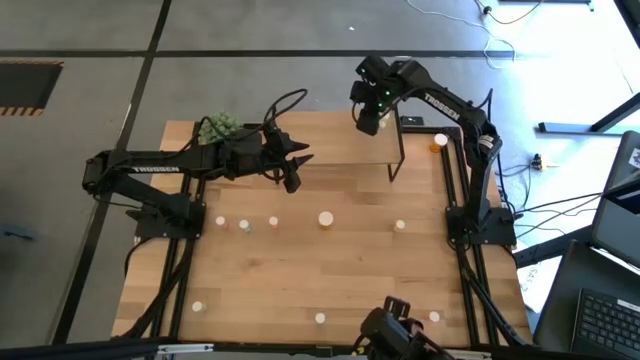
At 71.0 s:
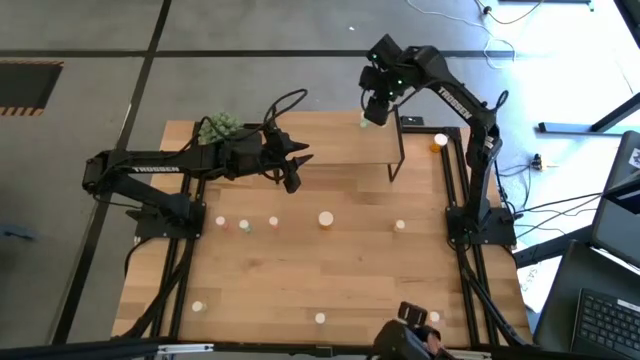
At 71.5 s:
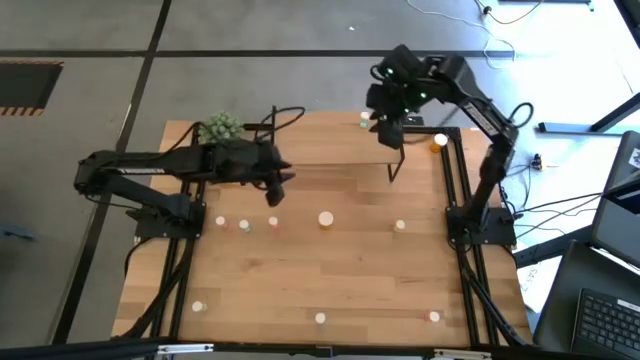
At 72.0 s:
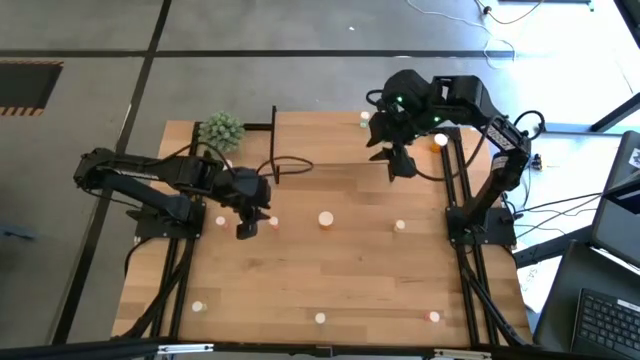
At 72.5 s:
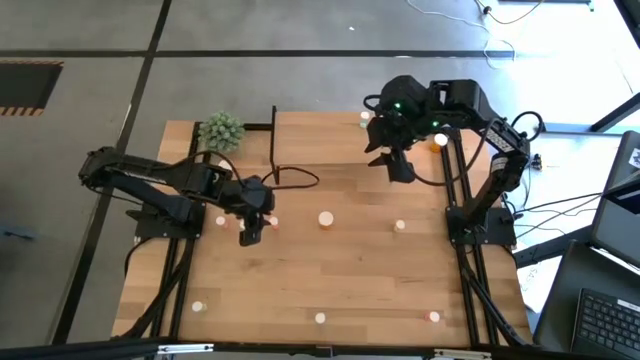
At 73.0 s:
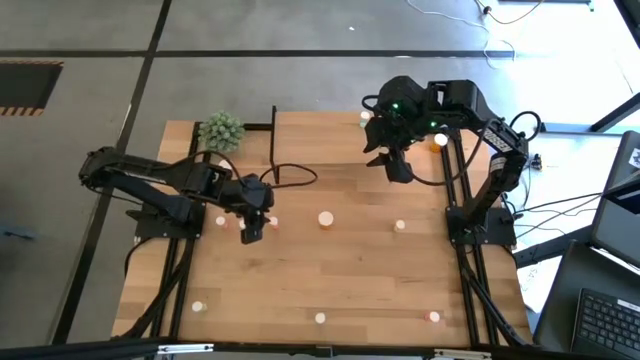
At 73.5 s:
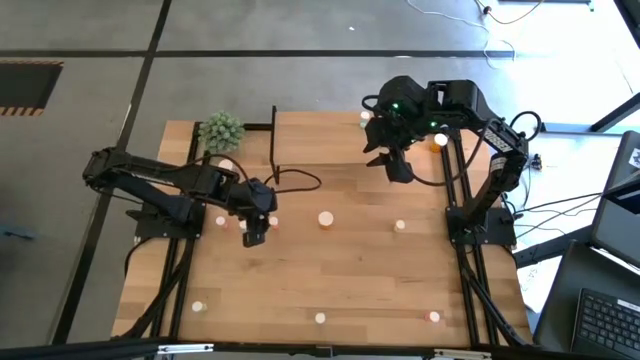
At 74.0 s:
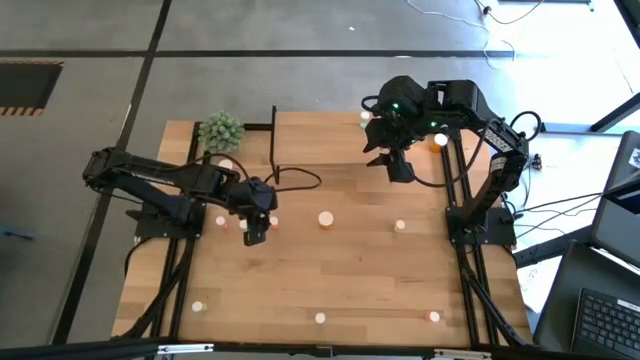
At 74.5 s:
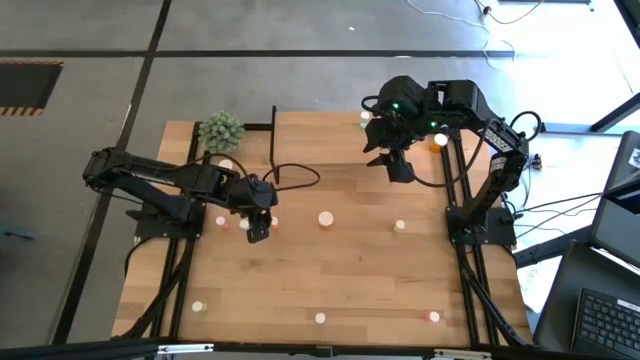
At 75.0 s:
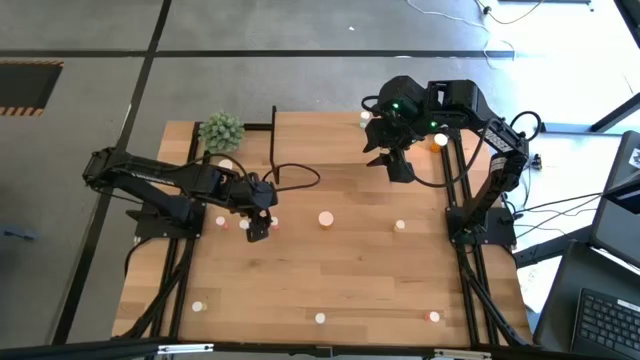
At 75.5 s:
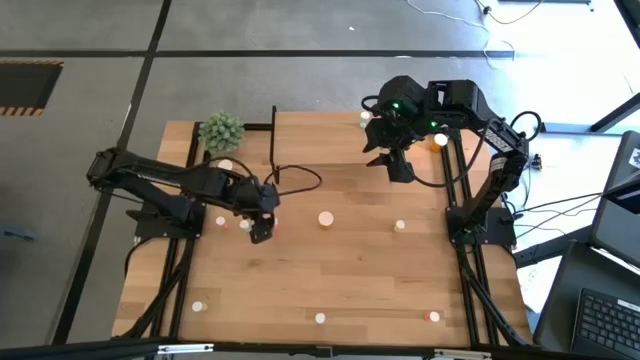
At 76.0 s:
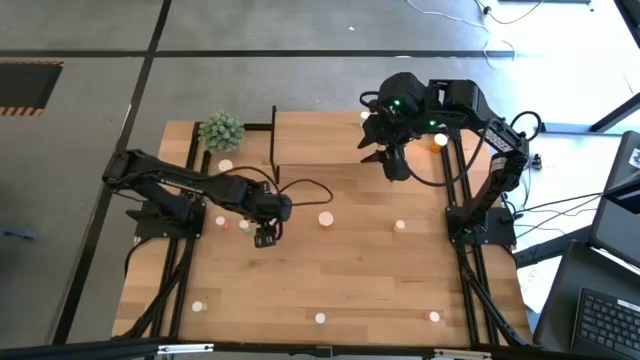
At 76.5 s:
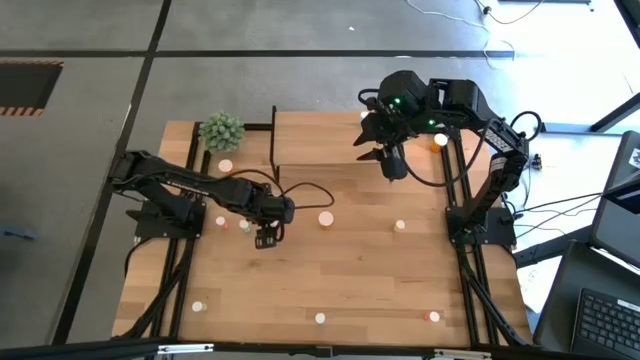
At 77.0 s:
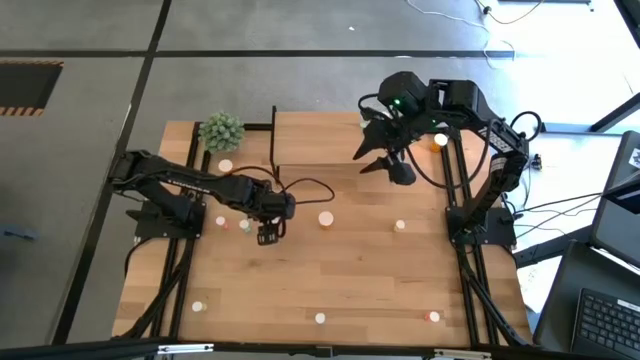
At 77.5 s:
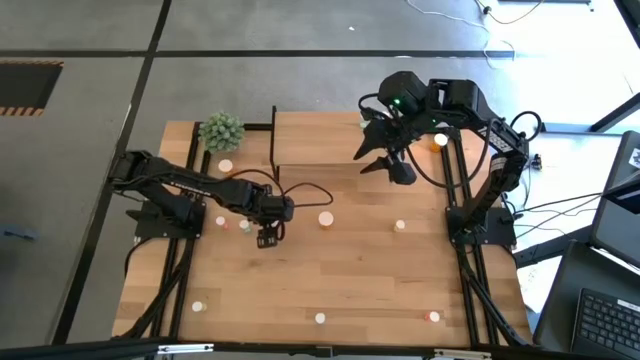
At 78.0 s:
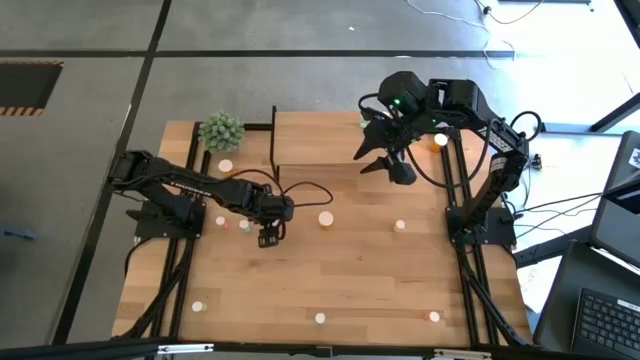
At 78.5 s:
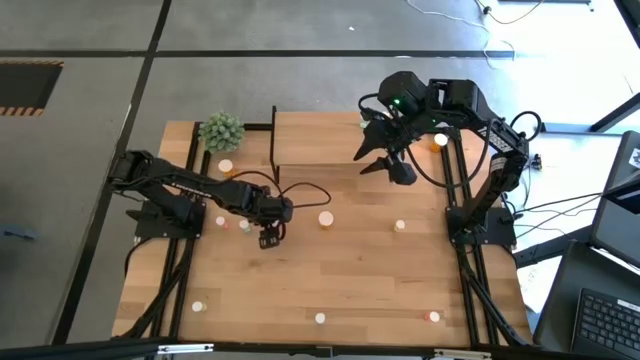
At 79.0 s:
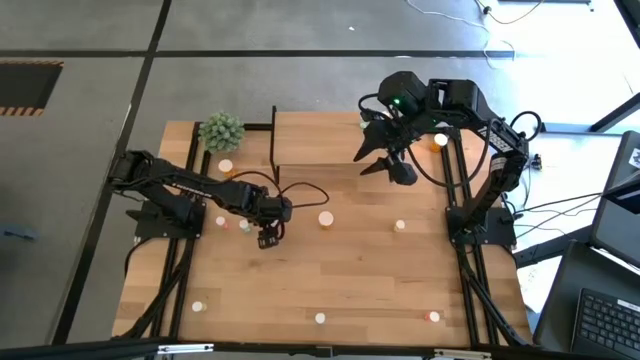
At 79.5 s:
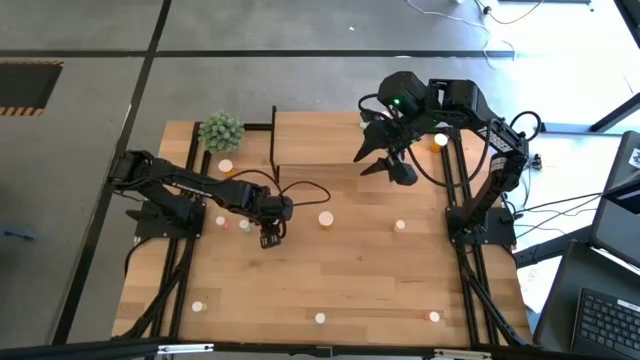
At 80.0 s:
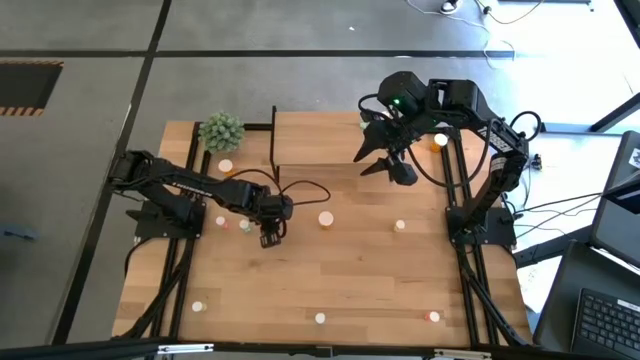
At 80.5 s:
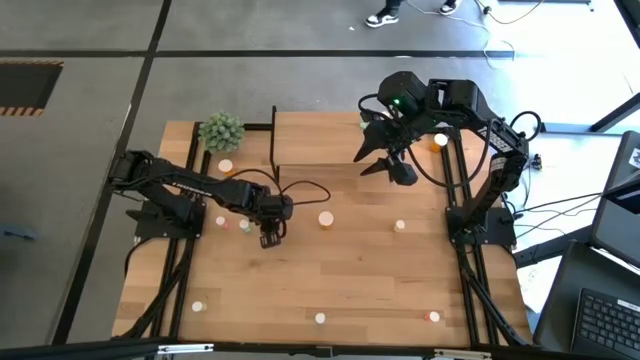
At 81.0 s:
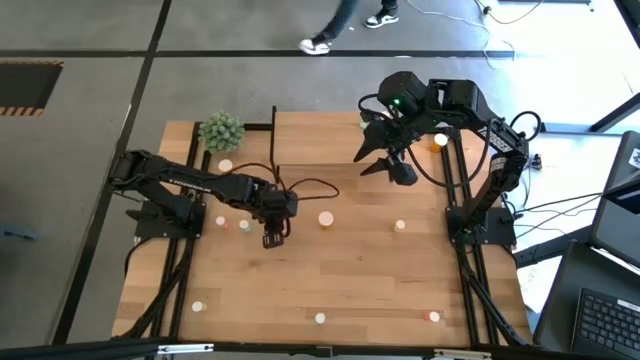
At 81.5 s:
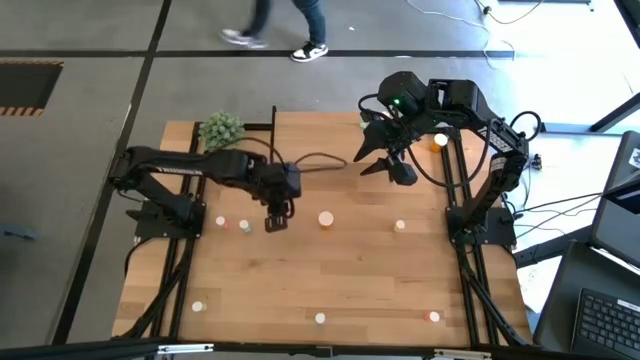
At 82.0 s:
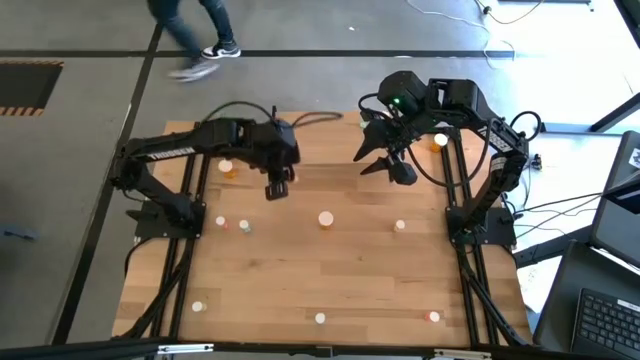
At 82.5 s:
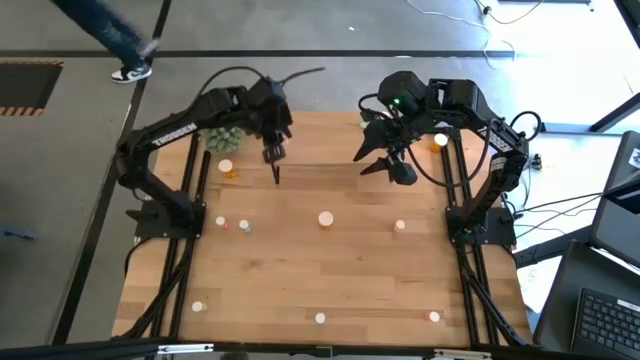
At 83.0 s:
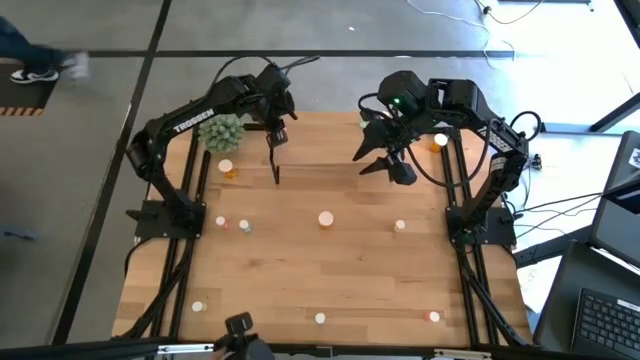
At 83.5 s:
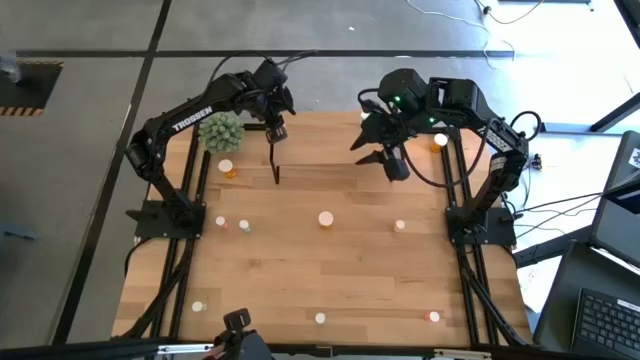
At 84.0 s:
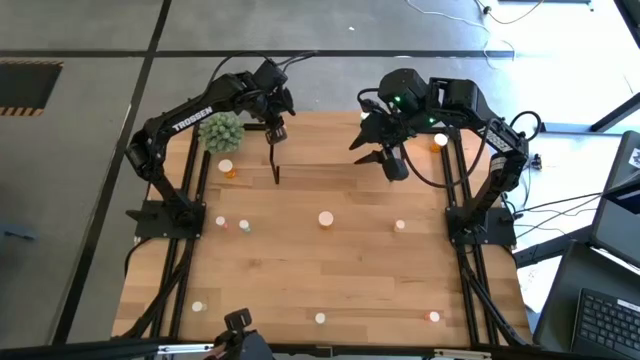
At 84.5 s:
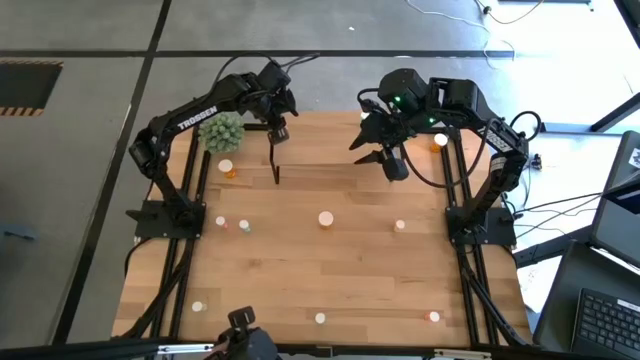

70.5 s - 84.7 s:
Task: Pick and place medicine bottles onto shelf by color
Put the top right red medicine bottle on the shelf

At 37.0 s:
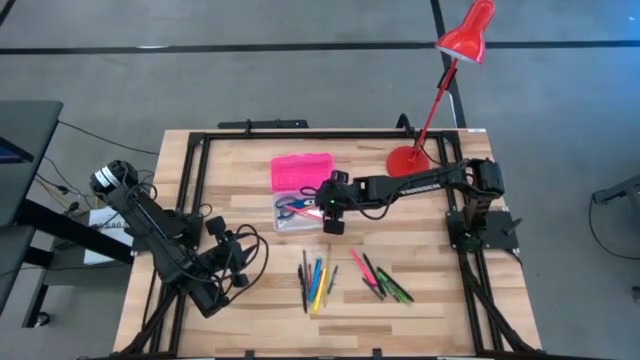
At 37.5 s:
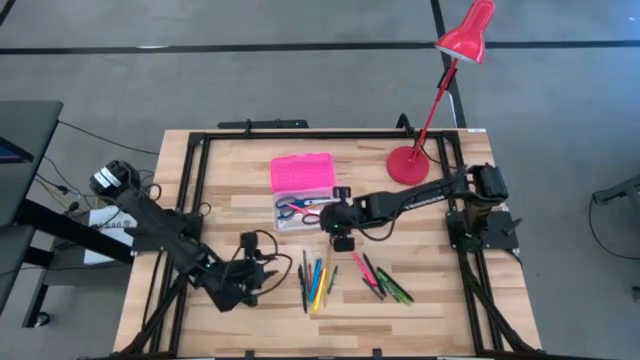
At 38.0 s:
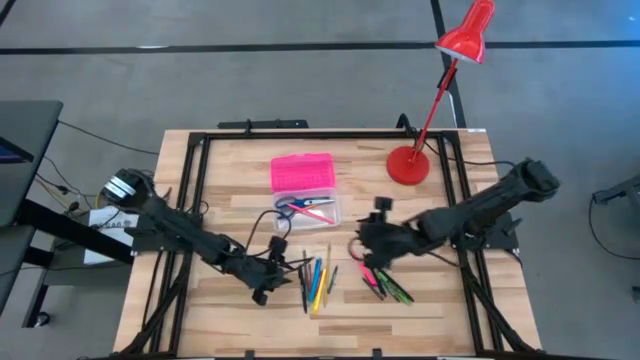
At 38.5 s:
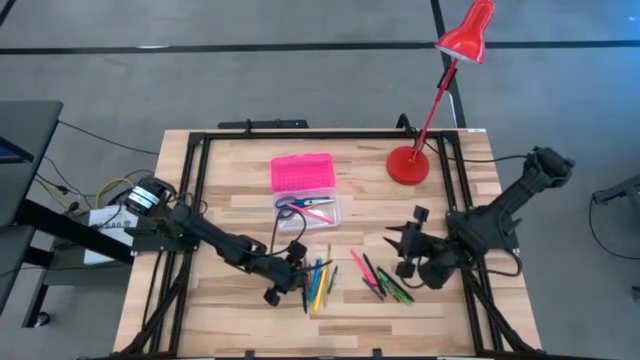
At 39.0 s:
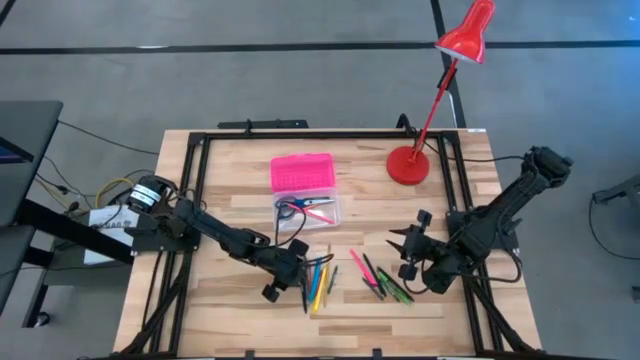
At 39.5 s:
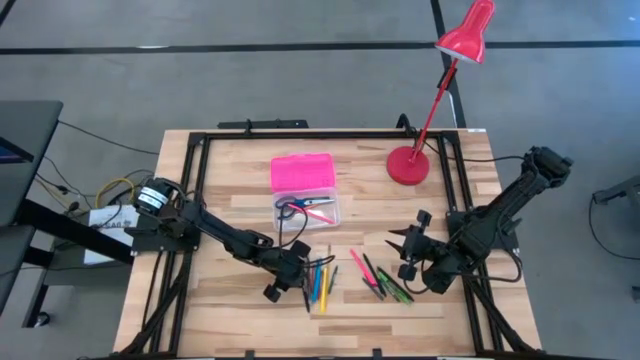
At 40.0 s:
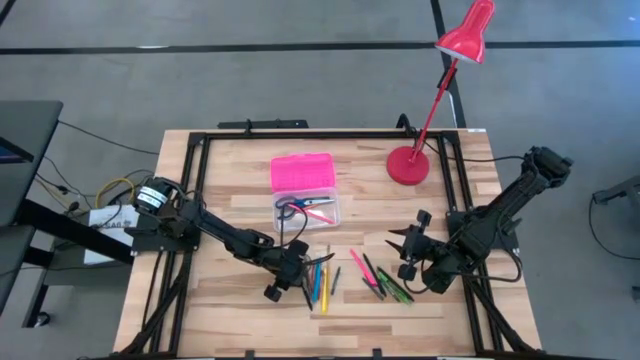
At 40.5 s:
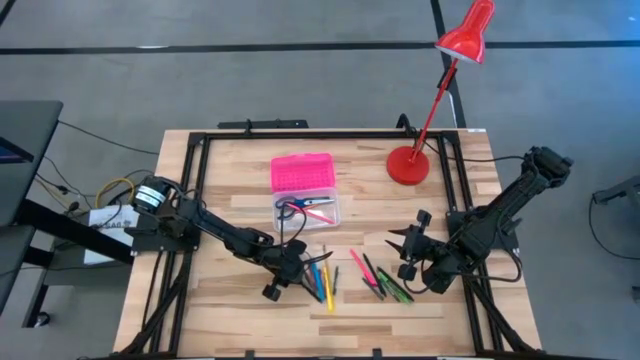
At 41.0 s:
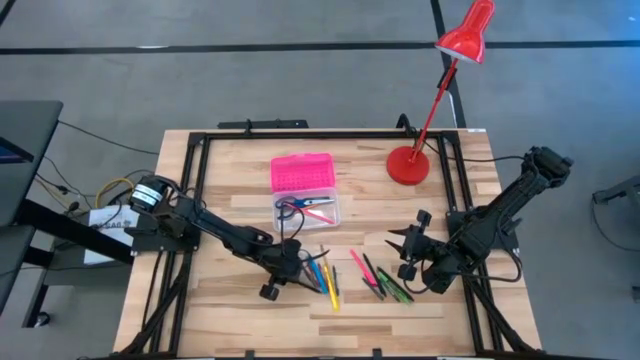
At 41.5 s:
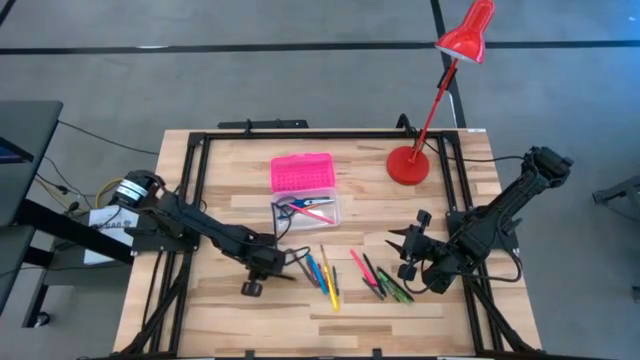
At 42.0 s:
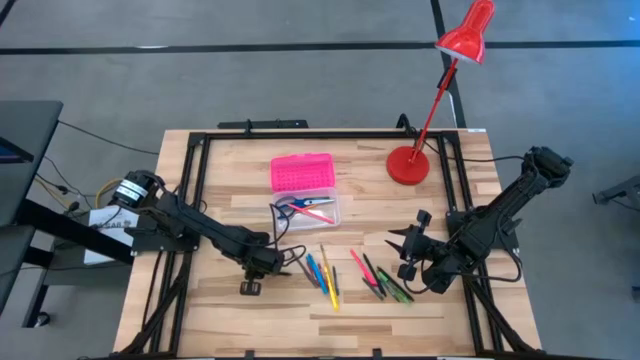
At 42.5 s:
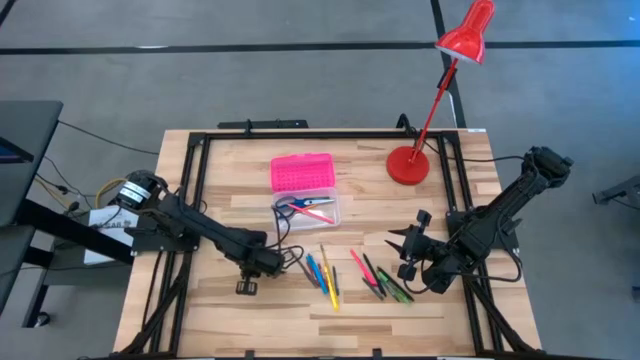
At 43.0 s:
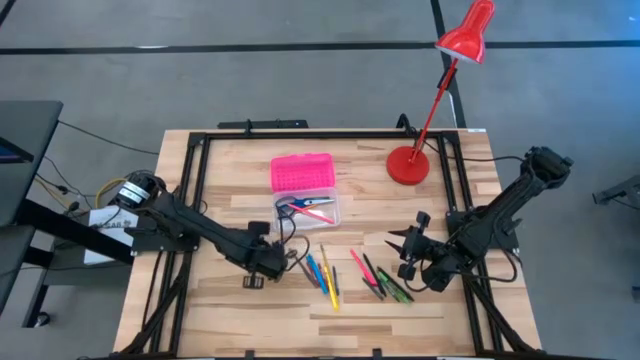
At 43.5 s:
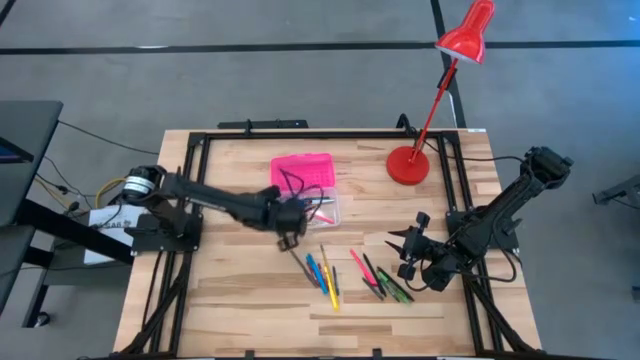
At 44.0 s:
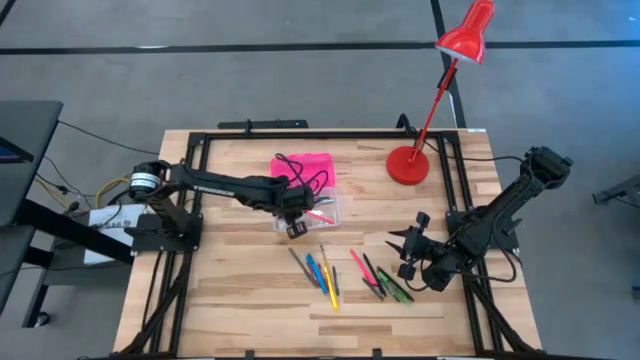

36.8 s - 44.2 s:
Task: Pick & place school supplies into a supply box
Put the black pen into the pink supply box
